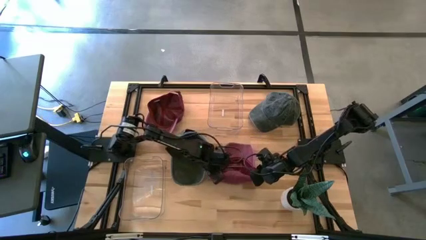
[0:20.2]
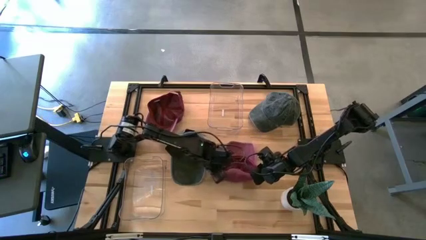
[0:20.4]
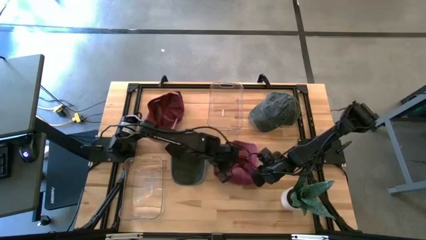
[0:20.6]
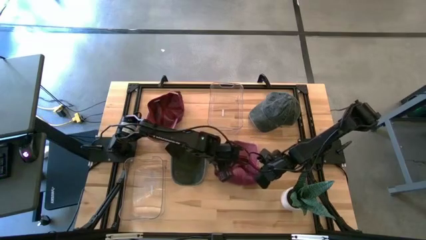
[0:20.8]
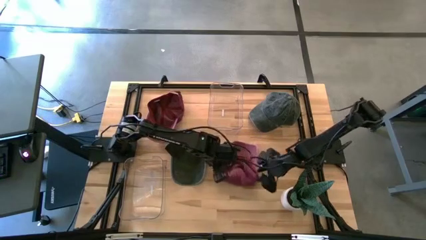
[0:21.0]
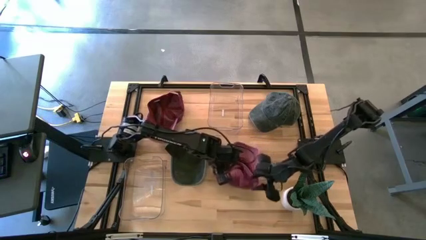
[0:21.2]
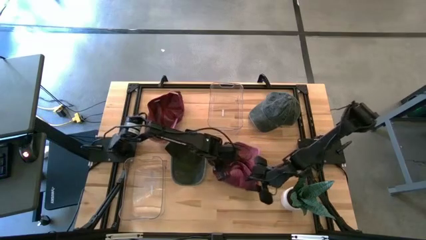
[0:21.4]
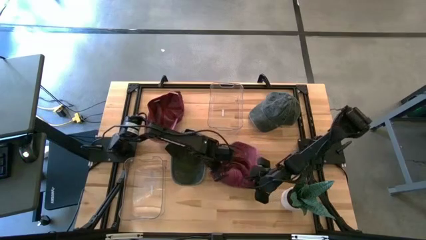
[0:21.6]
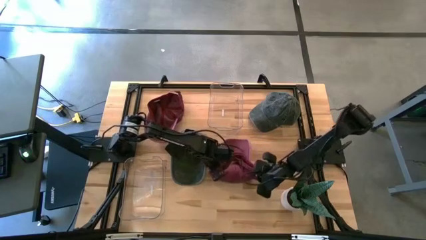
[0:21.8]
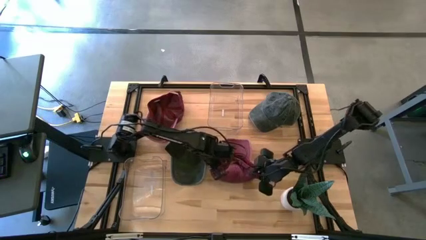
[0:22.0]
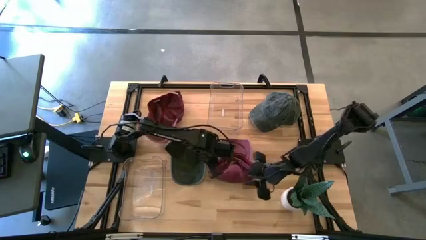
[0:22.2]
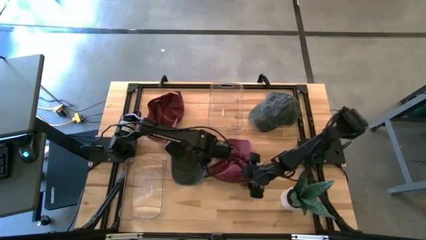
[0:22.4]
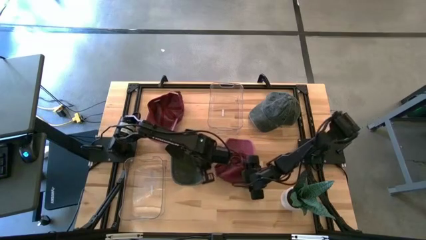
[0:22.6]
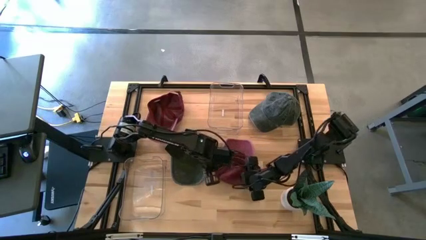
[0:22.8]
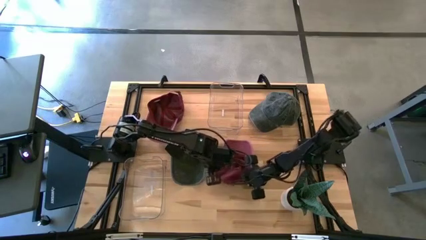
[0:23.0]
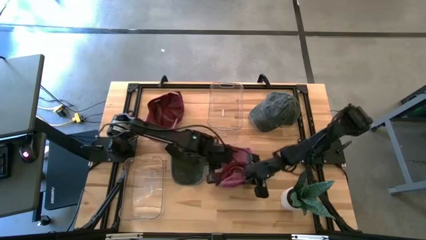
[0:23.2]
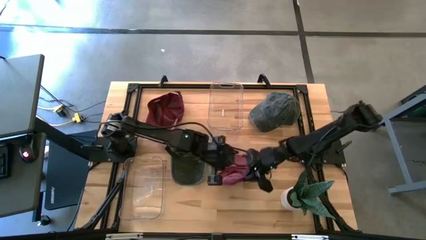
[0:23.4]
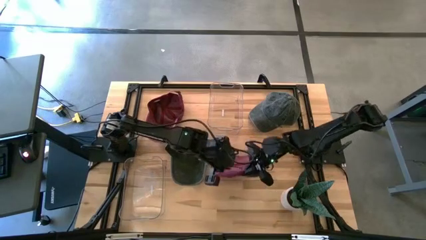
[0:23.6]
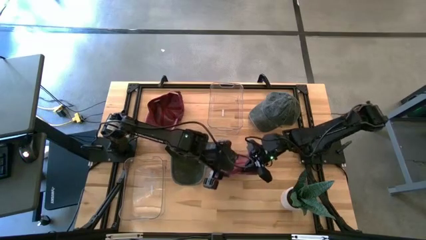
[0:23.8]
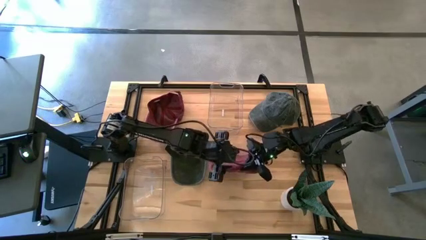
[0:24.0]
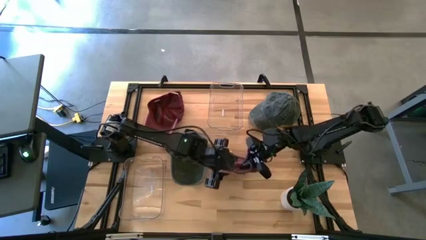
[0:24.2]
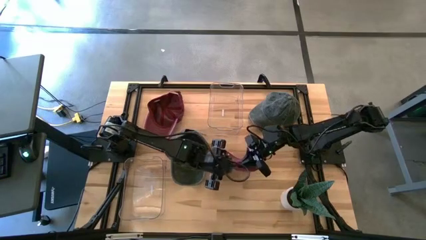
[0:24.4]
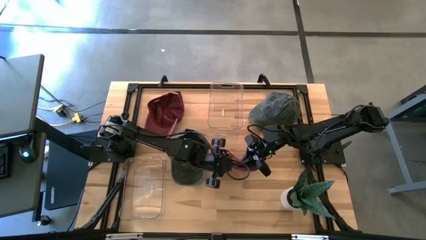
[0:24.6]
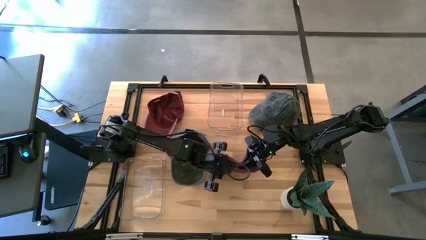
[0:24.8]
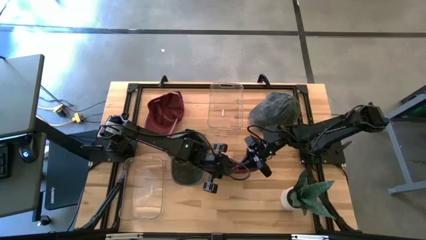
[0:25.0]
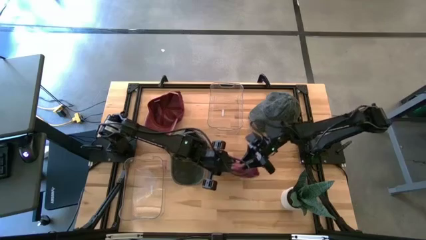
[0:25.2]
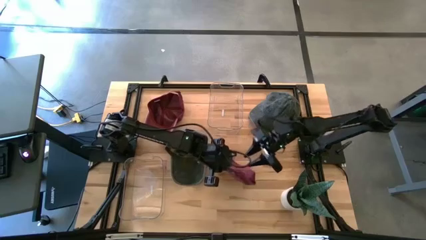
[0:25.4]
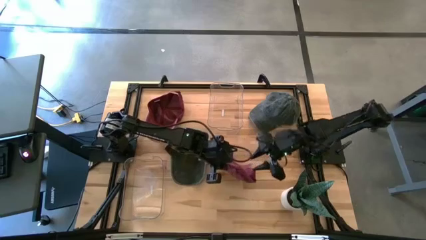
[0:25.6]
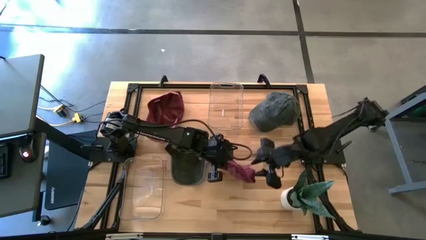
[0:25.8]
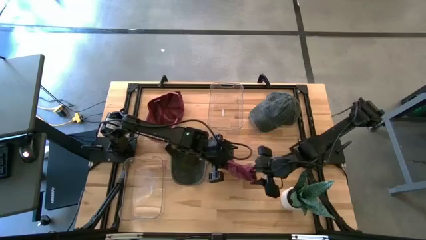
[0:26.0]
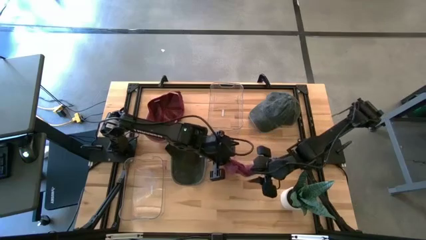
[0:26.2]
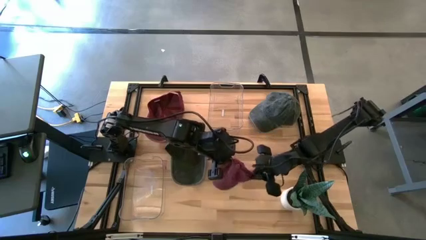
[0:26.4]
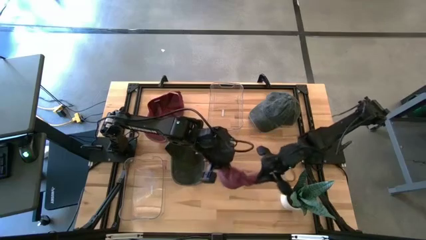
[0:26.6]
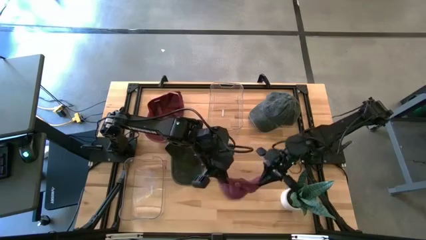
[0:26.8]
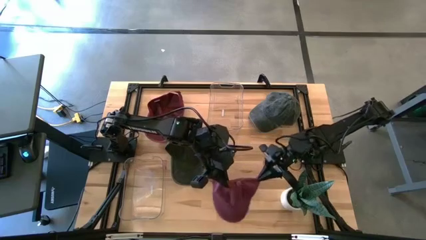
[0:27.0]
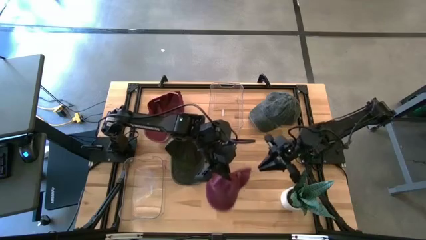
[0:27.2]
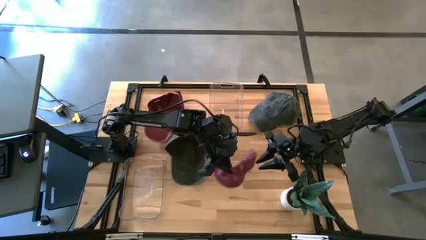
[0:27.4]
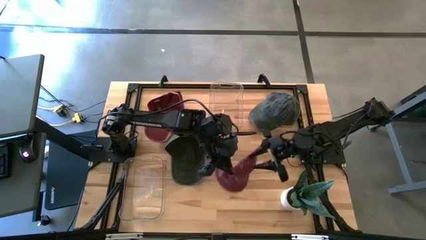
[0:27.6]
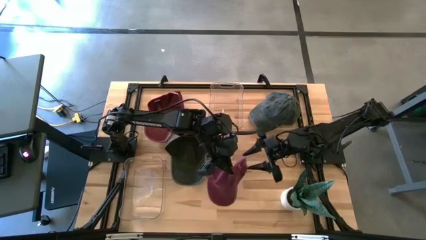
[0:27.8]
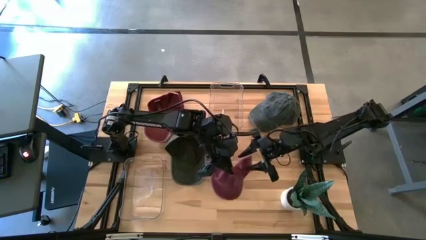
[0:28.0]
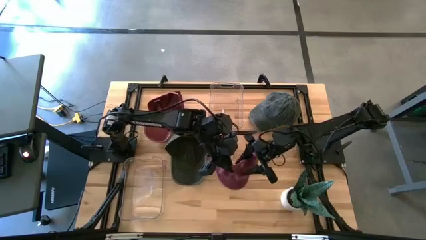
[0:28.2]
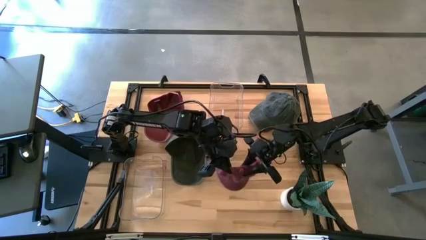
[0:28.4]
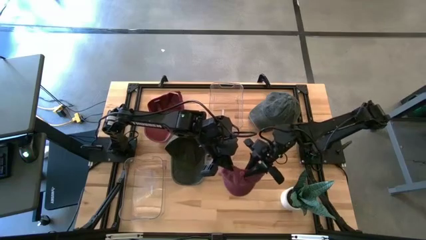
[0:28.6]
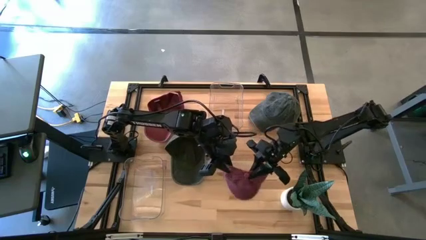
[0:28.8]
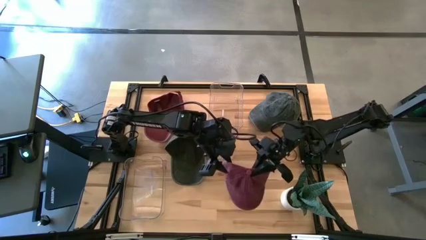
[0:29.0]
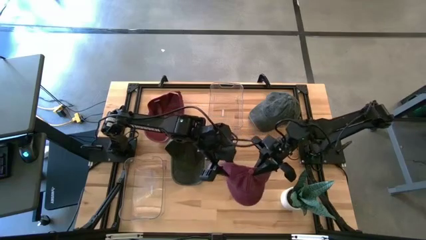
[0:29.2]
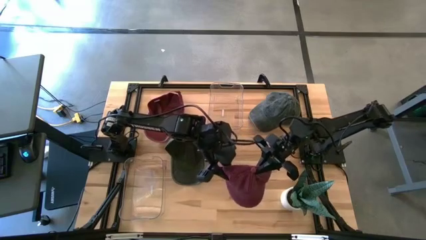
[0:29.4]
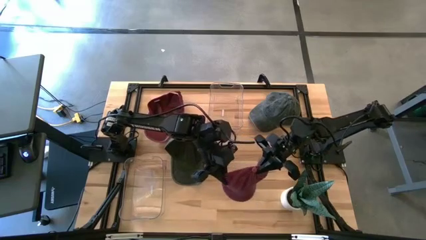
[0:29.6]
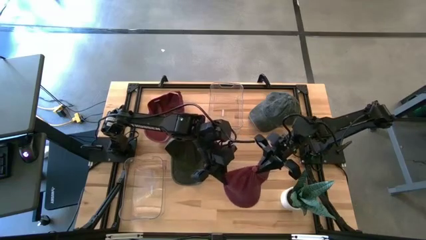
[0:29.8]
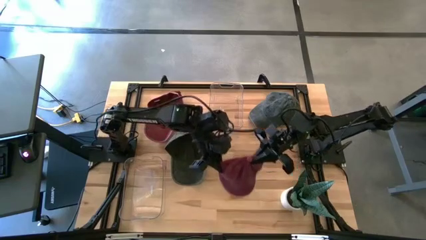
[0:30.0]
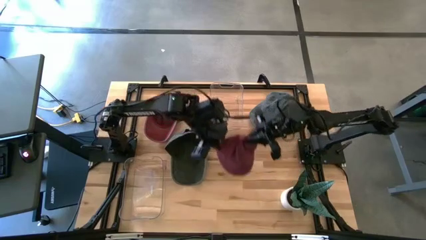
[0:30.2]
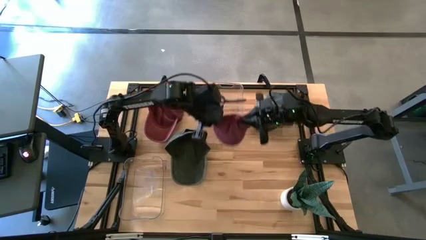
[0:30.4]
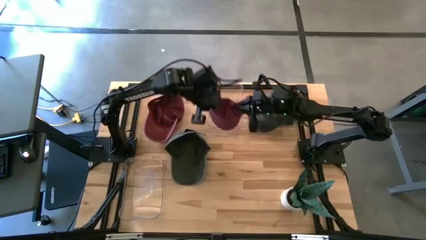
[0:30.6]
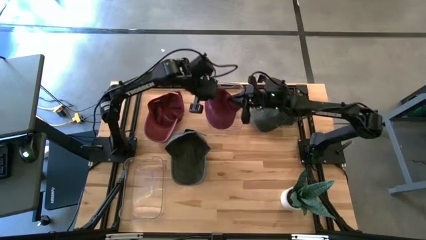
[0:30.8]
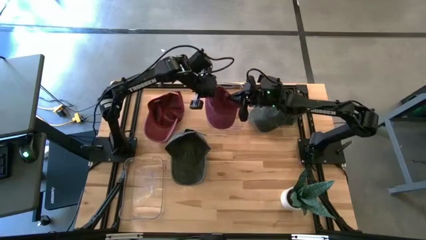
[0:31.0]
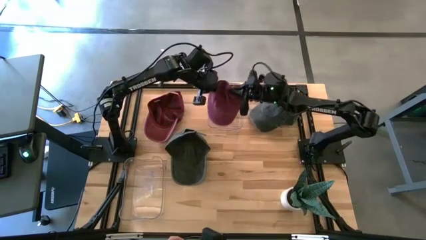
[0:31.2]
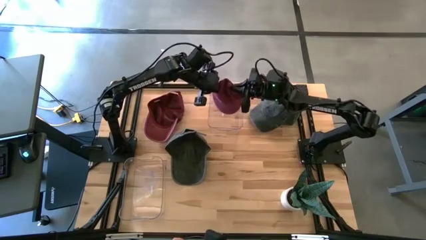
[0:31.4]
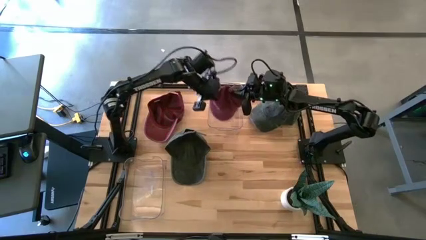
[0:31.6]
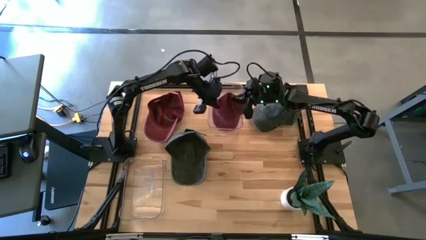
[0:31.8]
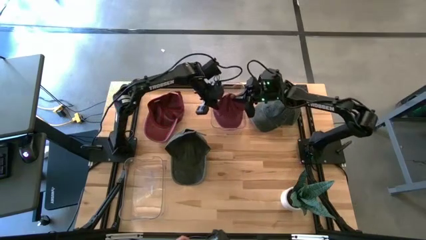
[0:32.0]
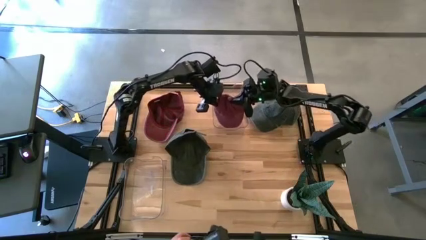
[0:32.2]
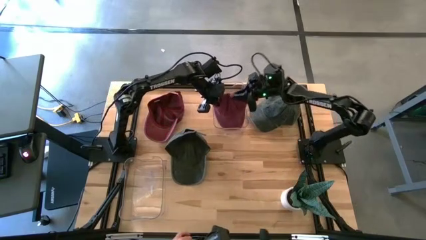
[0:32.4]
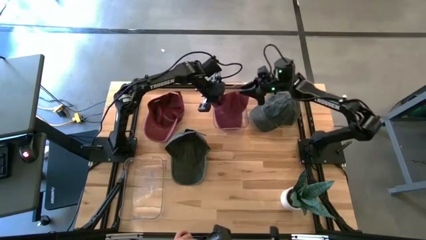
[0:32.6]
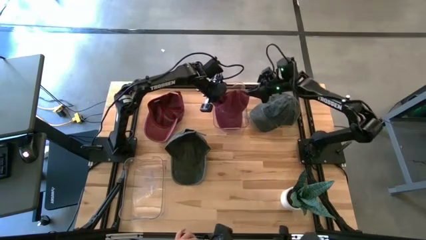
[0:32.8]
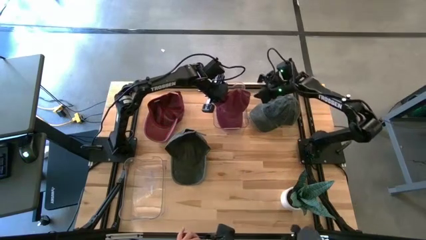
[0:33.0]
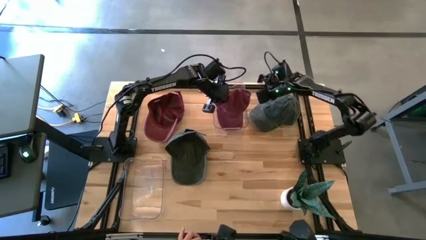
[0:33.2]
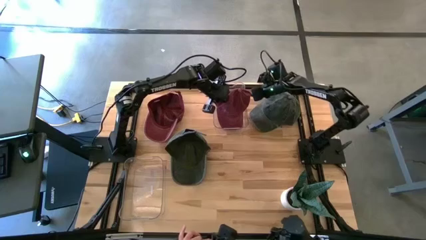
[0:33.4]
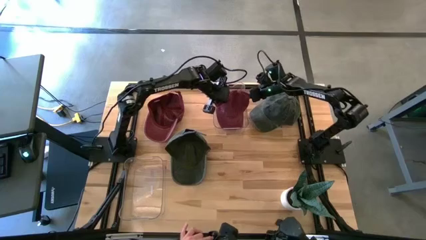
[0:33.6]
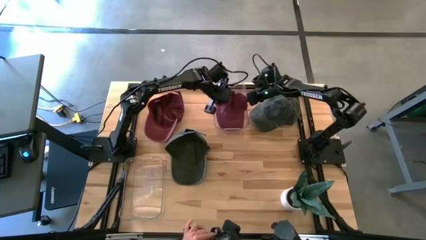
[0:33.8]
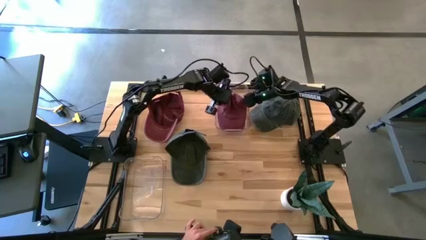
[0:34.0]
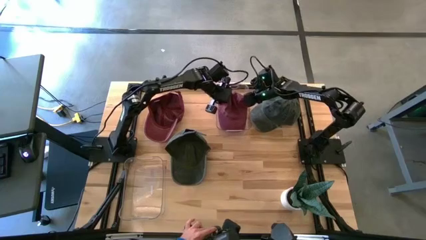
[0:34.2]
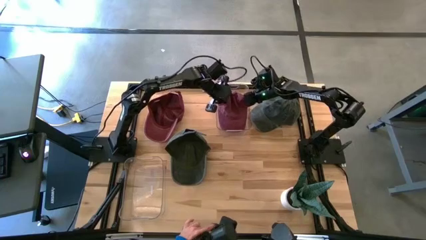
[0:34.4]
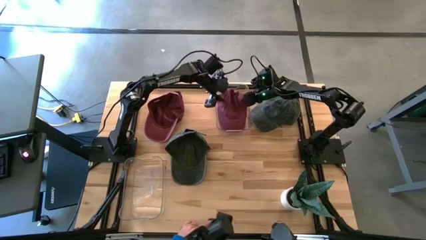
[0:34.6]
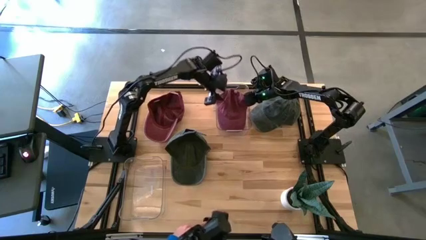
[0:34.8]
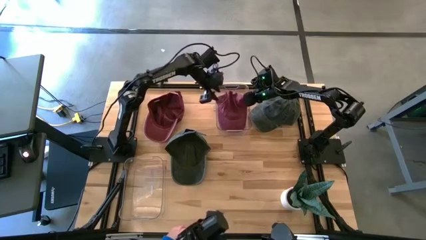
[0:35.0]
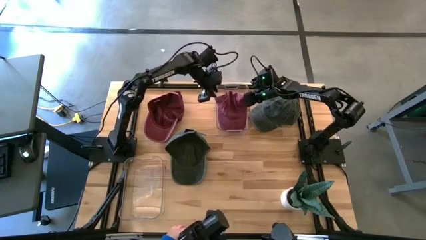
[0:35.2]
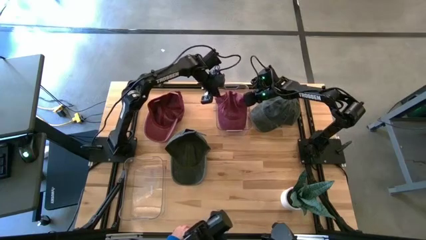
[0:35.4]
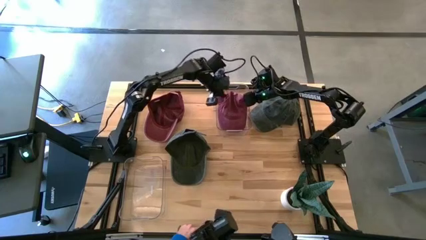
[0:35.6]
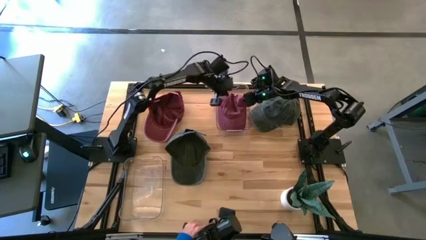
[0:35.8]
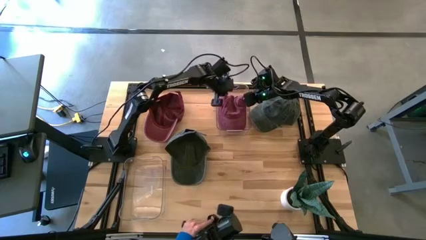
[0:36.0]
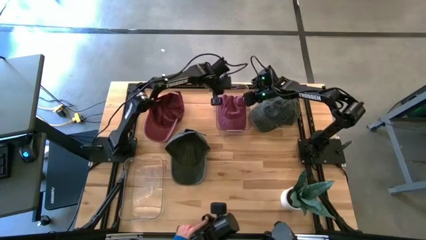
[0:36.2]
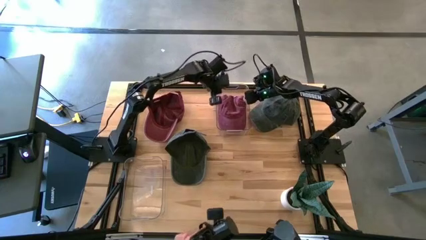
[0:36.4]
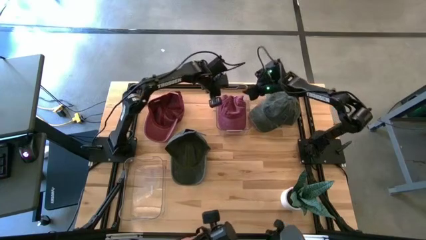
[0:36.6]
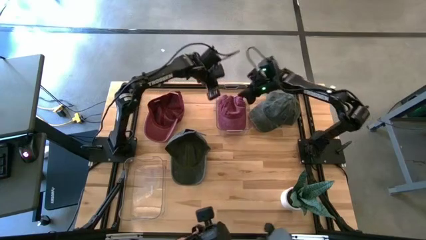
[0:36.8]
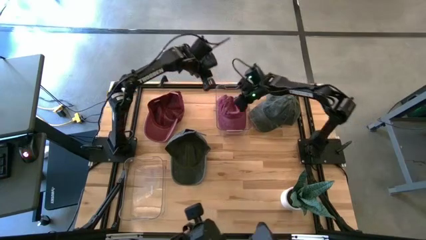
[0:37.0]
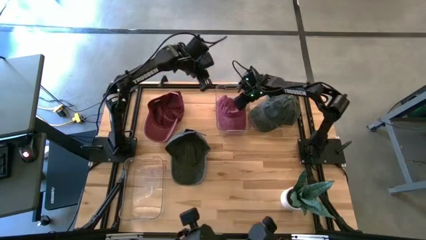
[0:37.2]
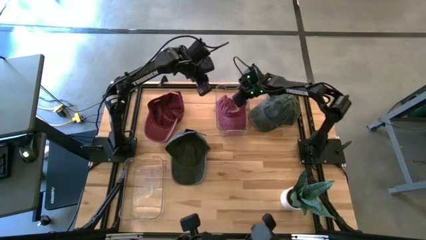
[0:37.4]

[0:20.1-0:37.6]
Task: Pick & Place hat
Put the bottom maroon cap into the top transparent bin
